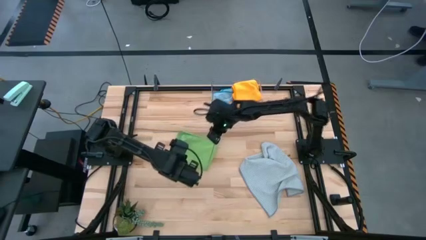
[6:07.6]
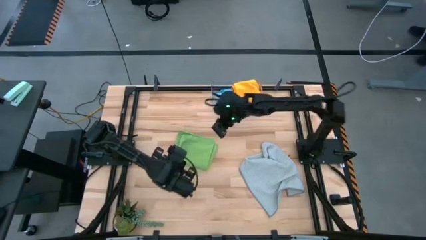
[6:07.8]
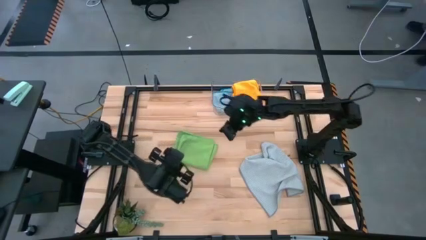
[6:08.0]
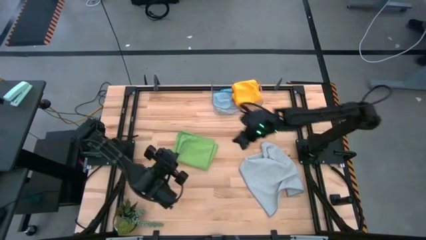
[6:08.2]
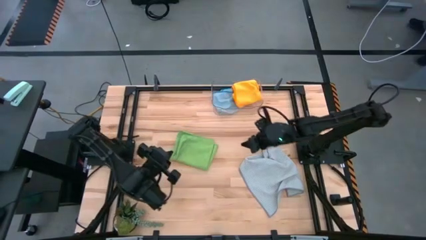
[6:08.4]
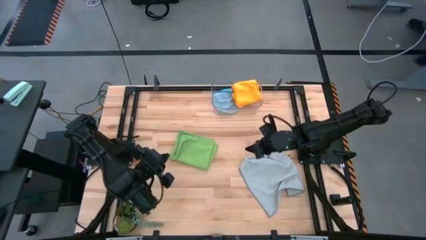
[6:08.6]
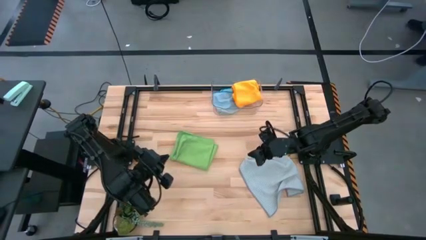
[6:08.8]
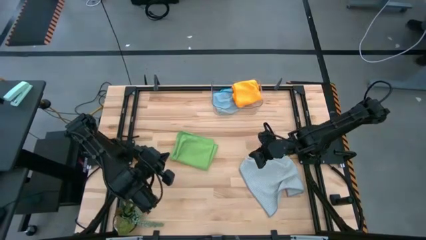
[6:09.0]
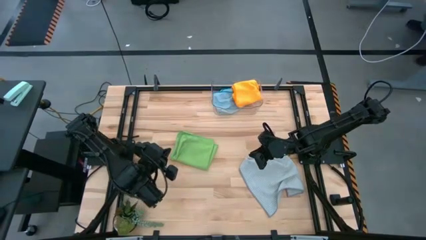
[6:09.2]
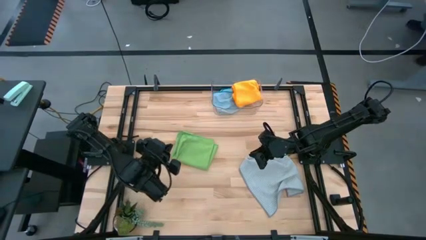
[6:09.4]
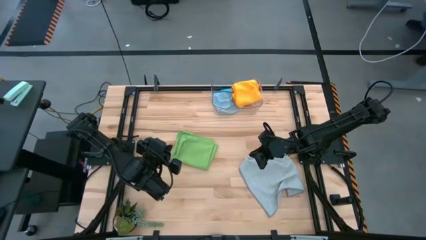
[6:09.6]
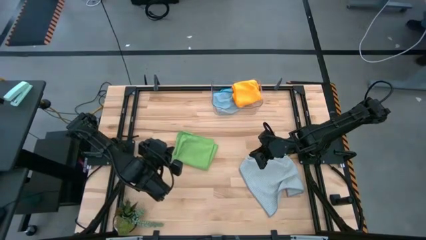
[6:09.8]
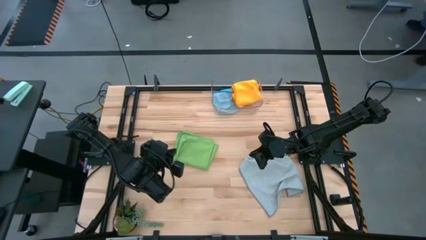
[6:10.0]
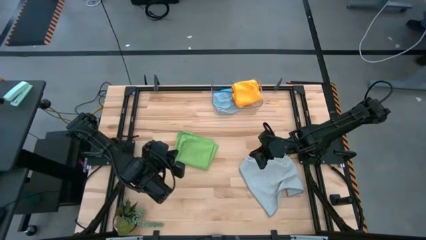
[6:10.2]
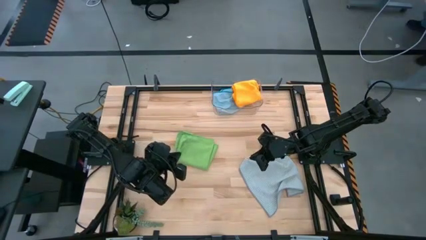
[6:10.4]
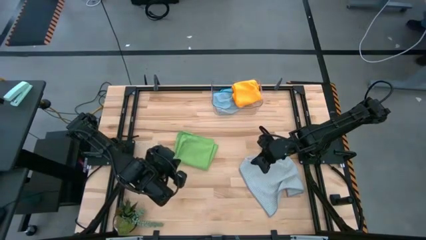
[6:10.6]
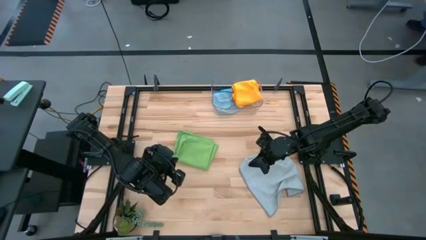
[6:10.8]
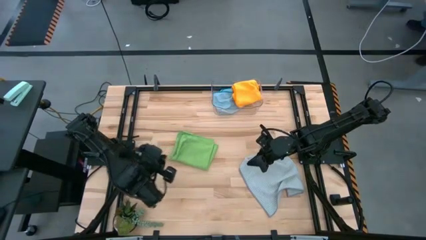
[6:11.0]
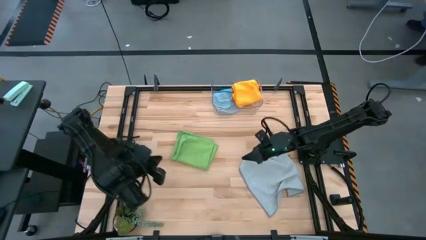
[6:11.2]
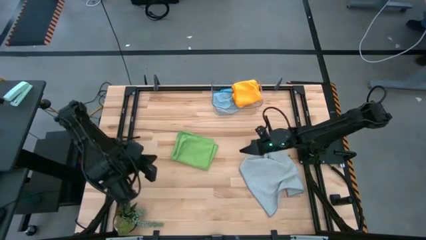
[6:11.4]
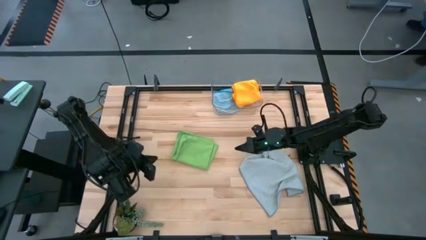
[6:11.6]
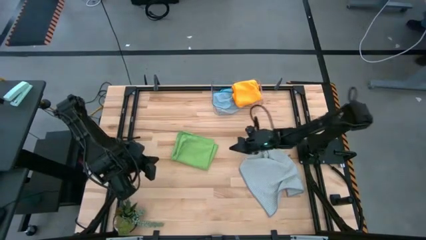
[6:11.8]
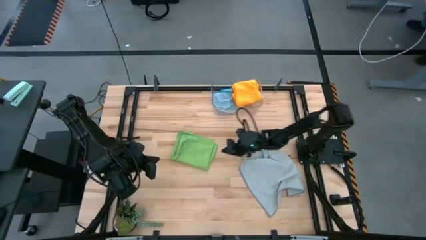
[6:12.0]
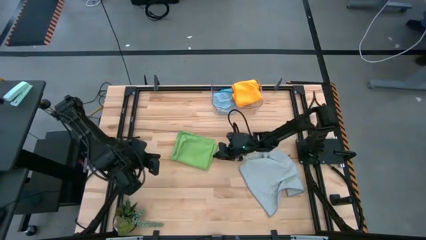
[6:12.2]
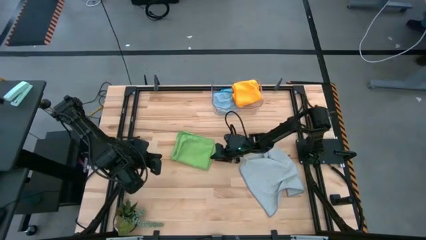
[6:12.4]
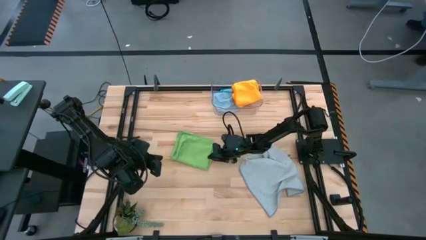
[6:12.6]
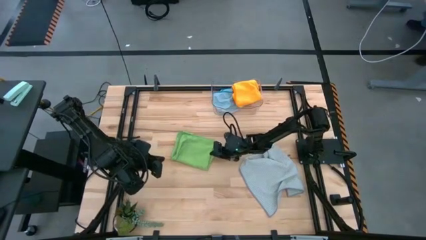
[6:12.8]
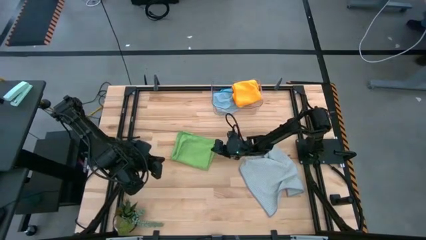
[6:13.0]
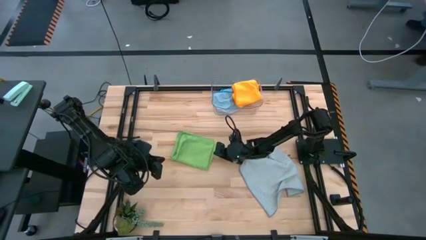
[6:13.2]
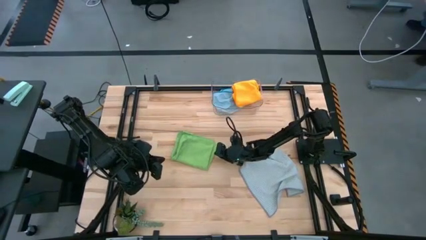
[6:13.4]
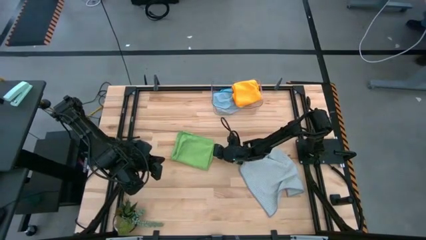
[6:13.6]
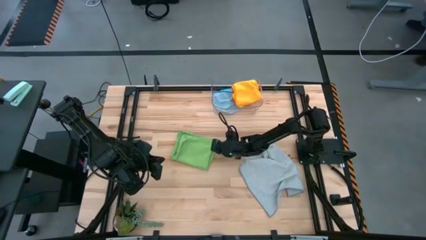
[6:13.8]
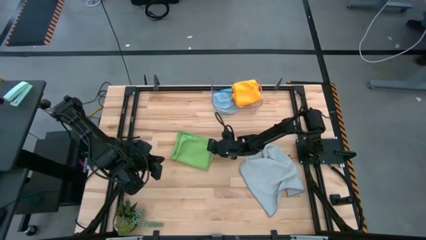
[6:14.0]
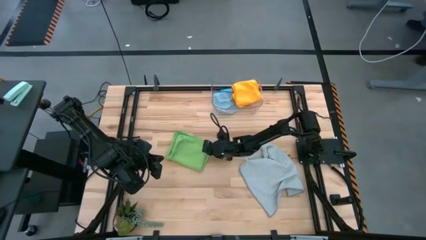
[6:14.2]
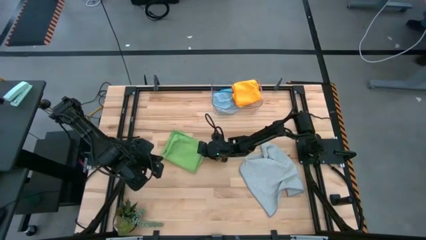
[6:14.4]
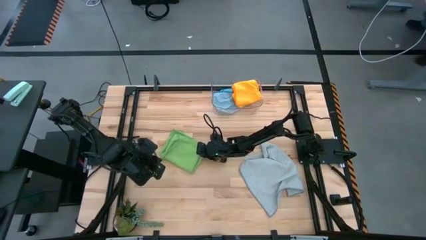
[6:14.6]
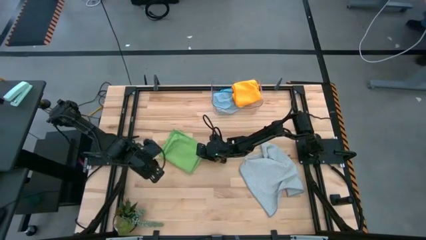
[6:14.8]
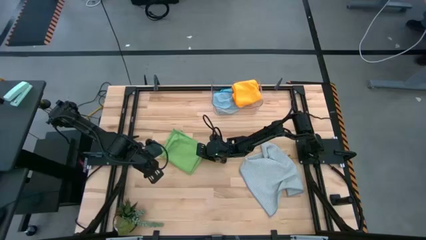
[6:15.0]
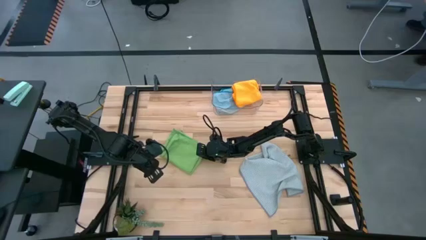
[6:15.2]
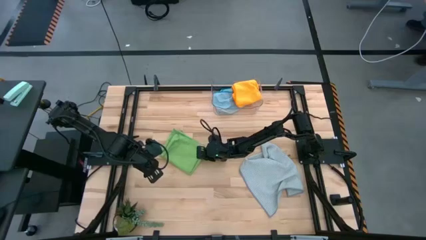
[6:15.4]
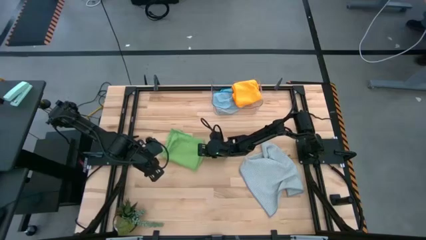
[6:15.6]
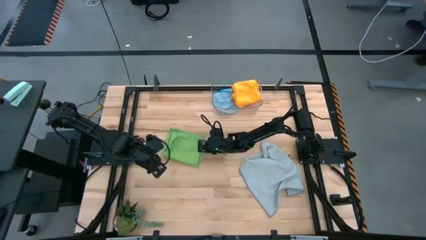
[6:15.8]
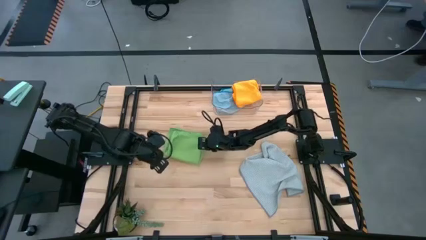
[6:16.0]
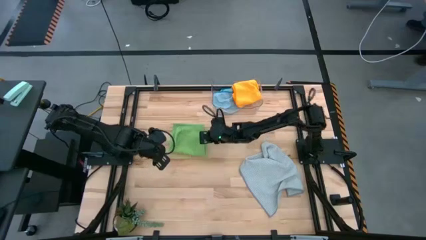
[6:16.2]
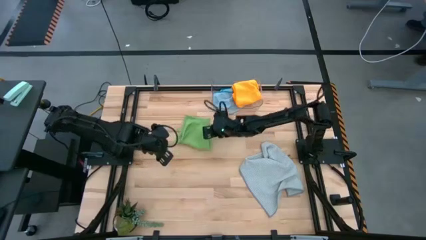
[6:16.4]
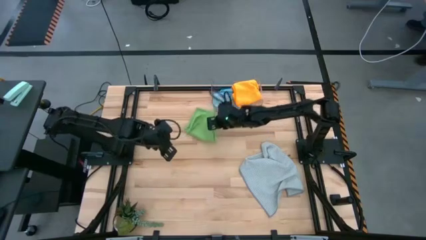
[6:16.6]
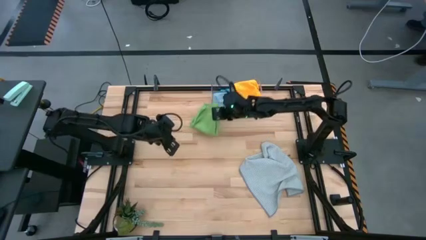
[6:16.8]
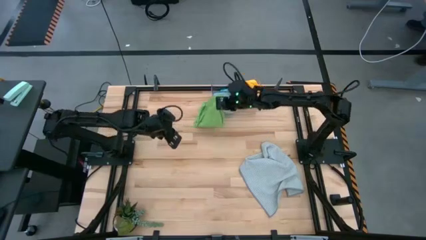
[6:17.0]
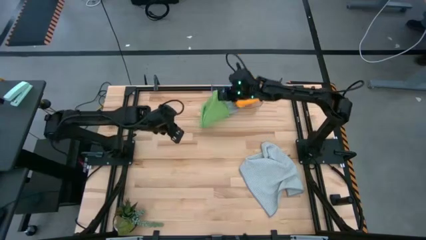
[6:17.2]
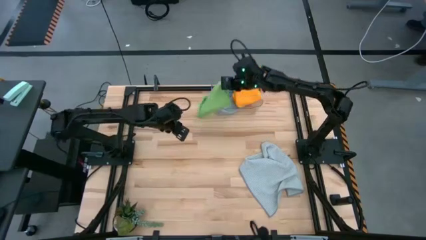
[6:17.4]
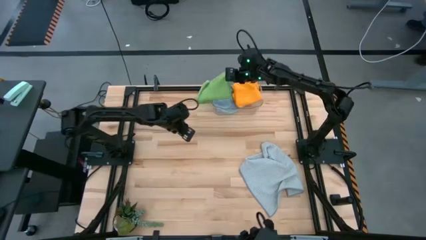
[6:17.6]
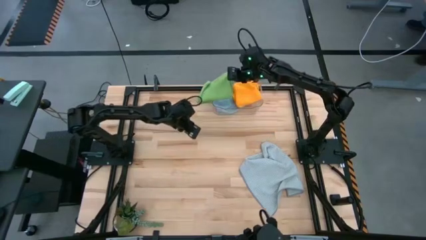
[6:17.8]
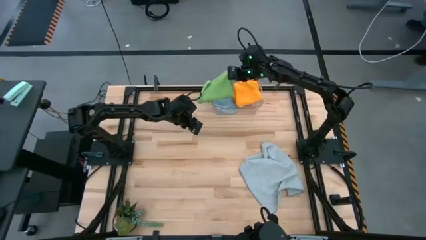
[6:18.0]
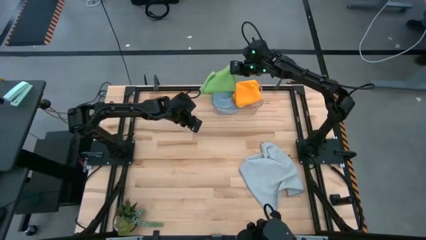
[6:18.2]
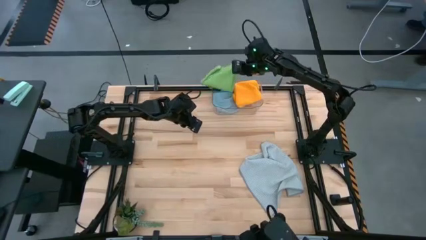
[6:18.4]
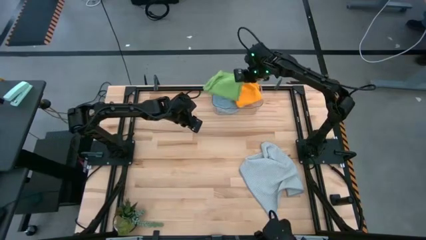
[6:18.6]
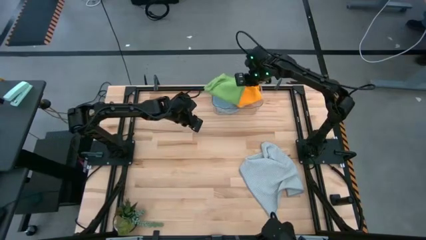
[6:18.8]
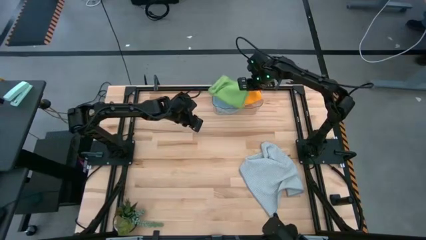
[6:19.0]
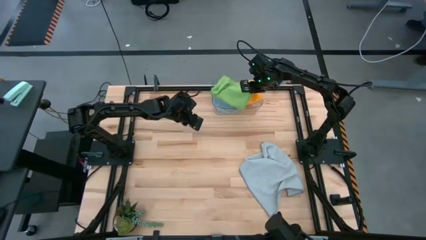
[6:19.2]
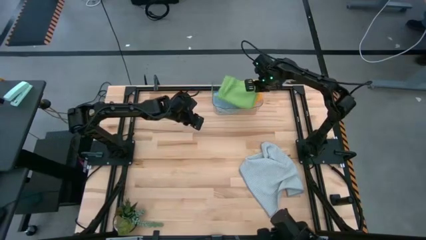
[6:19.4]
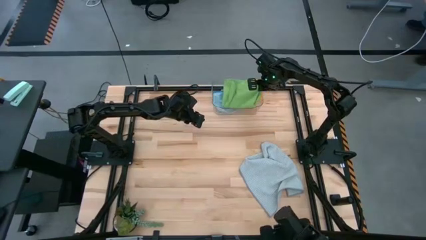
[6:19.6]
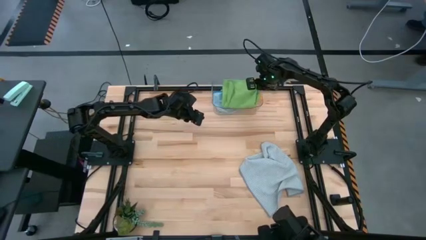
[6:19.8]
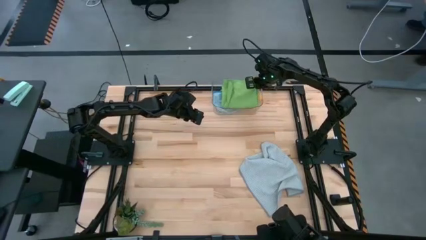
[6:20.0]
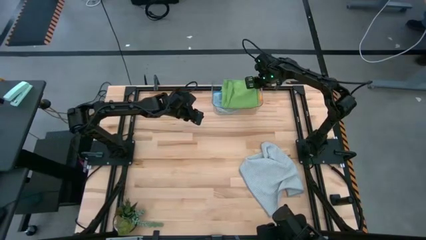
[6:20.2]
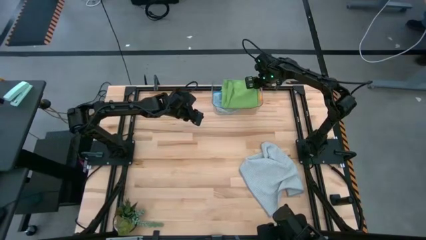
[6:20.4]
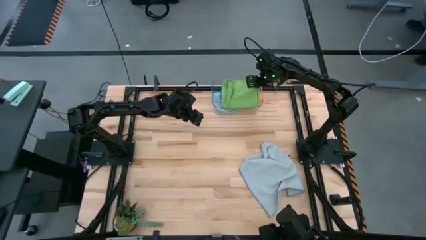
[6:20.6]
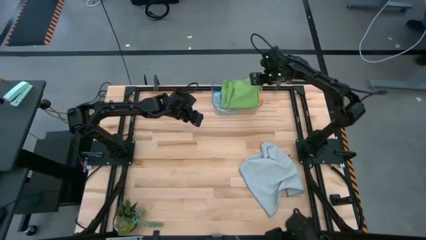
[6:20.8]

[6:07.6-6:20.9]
Task: Fold microfiber towels
Put the green microfiber cloth into the transparent bin

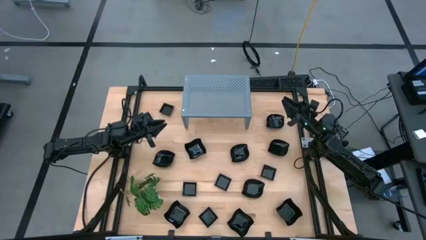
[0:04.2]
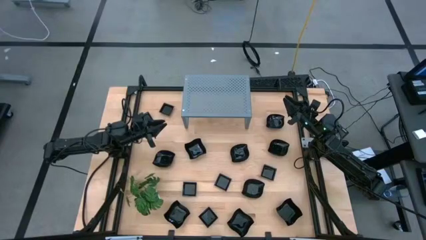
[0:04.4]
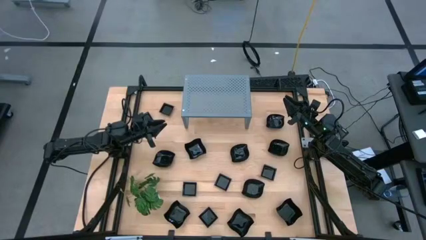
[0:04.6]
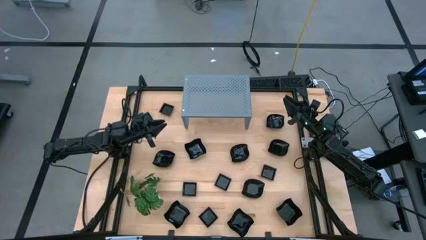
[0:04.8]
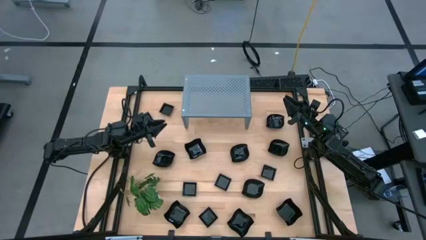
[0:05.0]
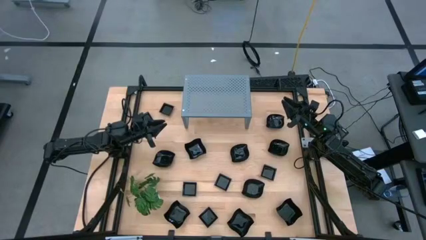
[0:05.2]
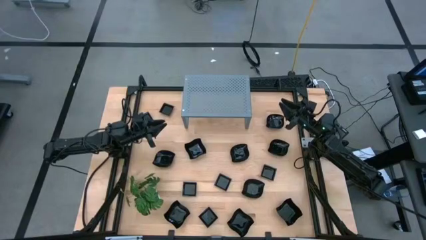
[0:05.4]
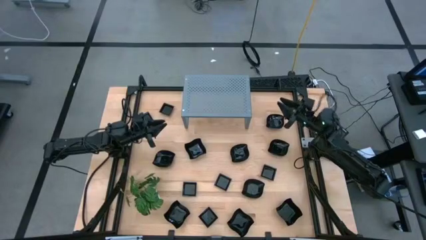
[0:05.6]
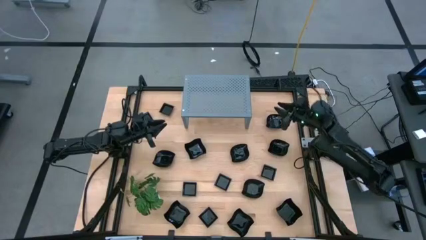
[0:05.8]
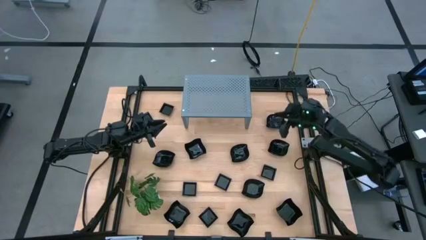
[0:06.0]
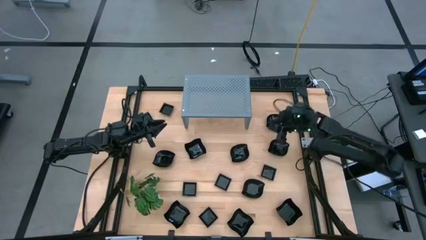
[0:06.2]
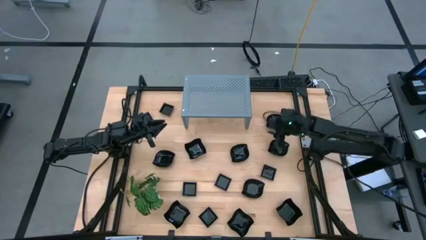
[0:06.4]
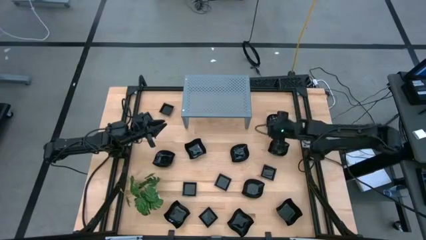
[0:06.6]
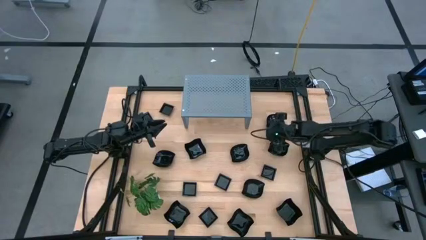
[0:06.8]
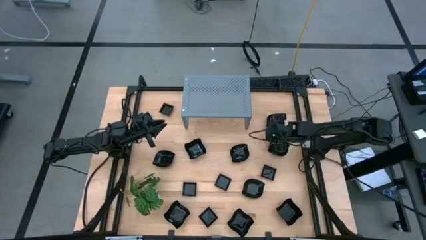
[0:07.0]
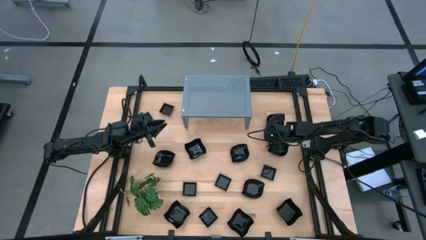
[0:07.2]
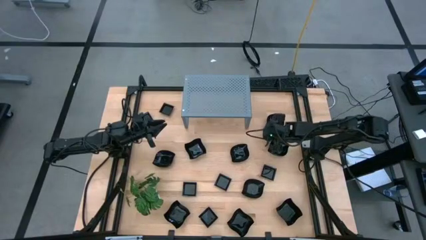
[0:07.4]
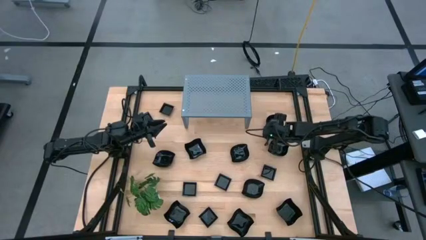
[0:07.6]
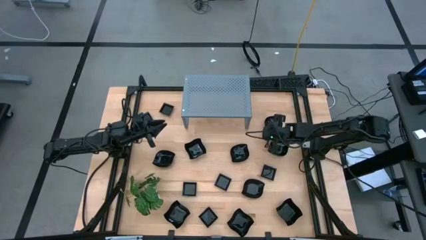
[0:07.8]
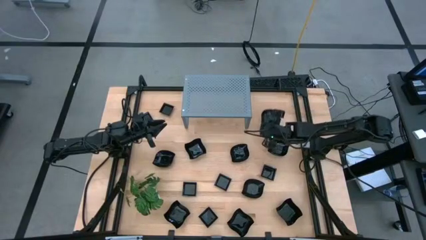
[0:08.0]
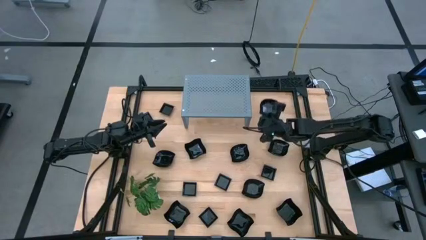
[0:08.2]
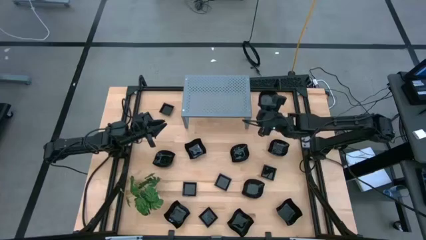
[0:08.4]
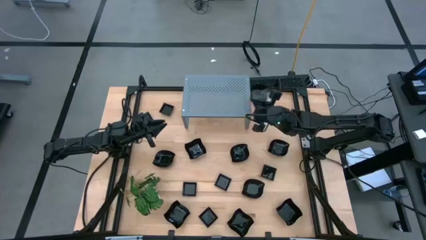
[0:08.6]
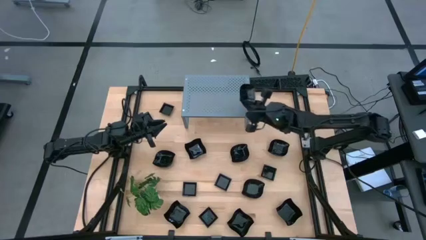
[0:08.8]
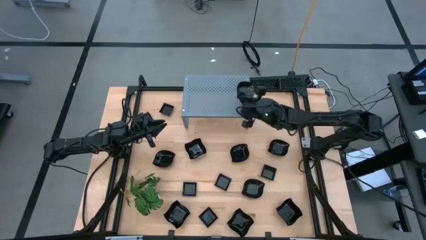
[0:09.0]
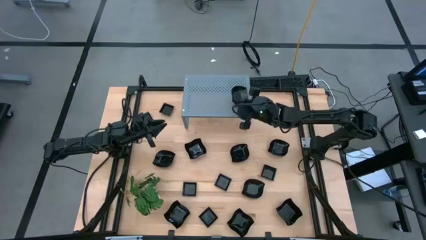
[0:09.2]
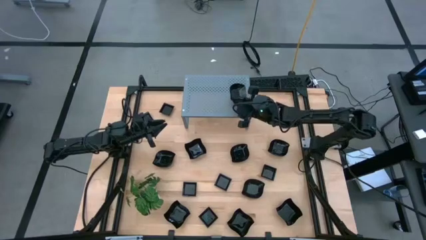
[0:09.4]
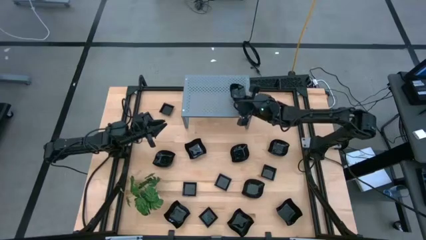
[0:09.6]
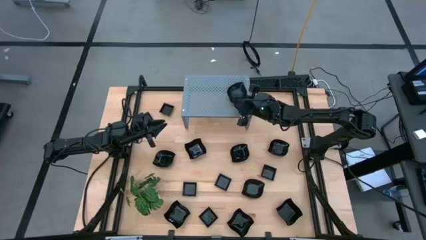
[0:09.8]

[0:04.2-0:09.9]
Task: Pick & Place Mini shaped plates
Put the black leaf shaped plate on the shelf
